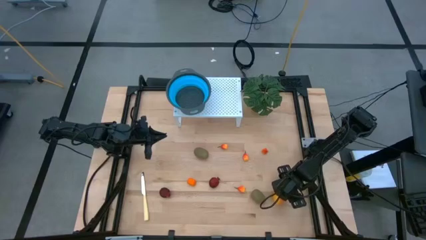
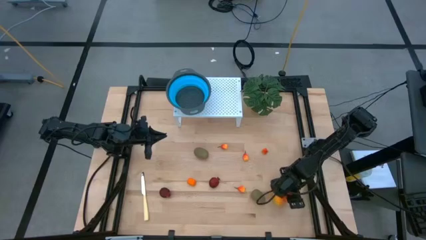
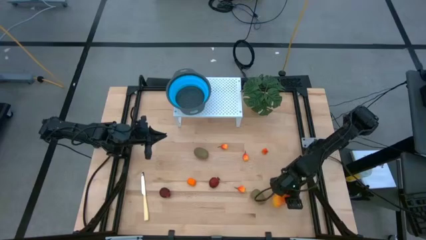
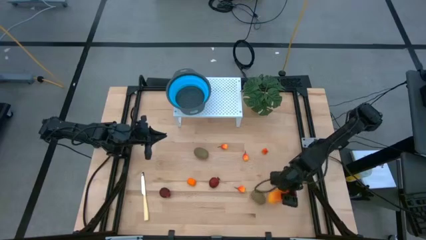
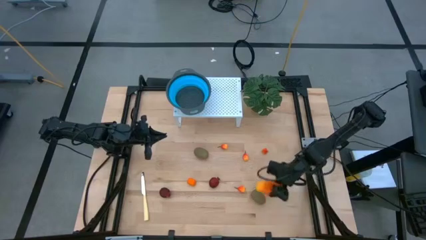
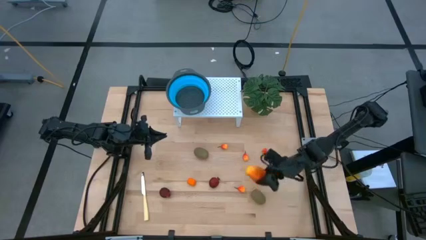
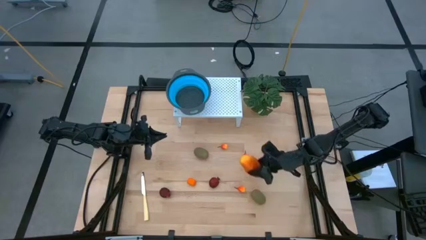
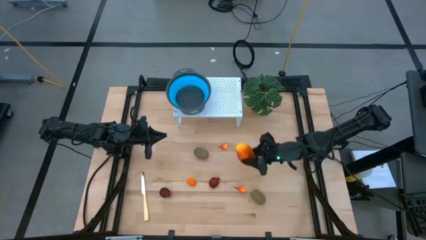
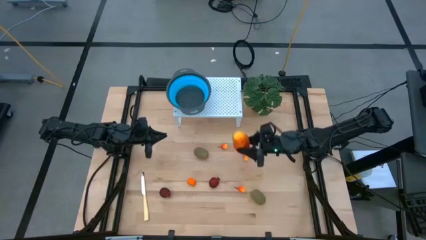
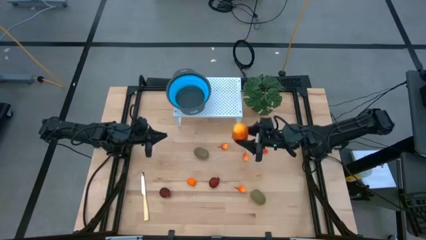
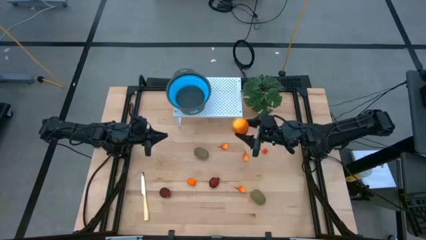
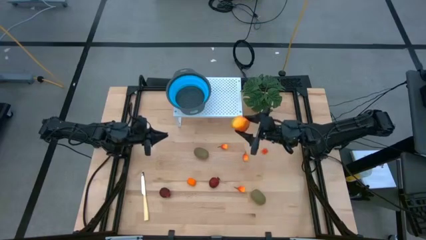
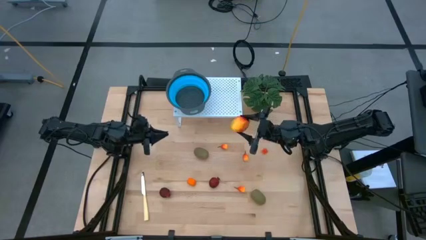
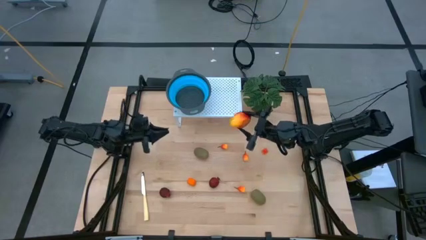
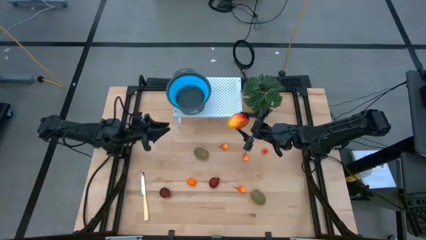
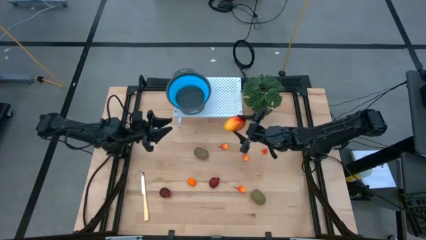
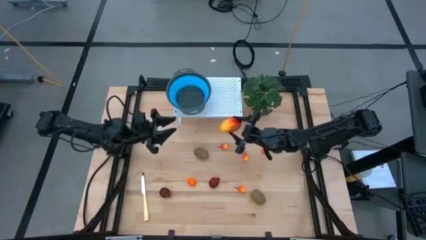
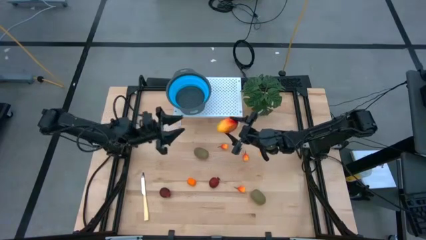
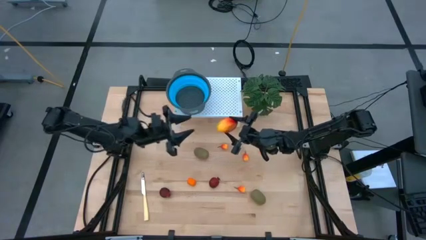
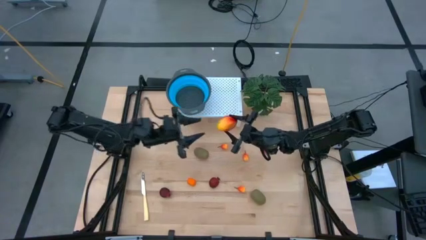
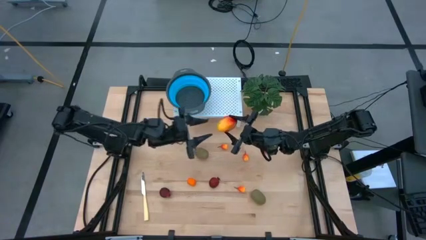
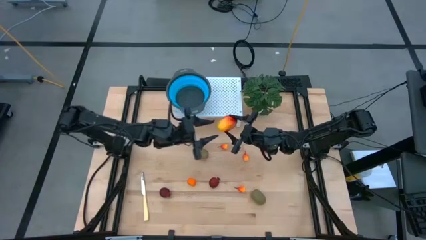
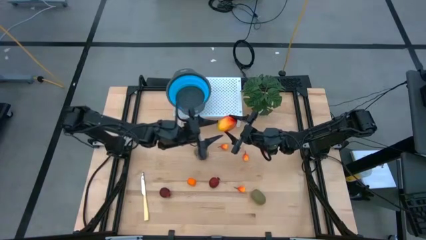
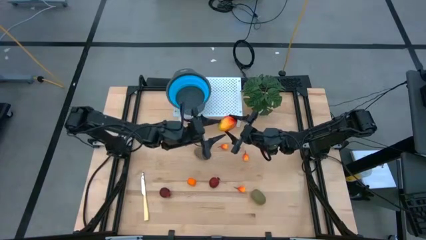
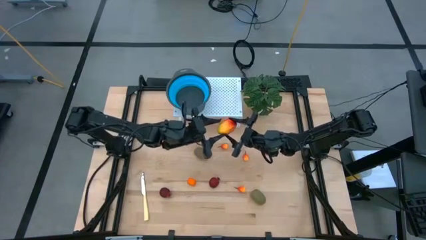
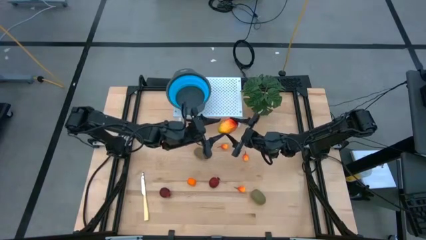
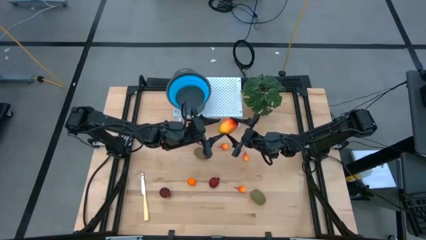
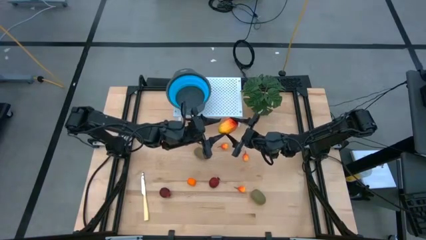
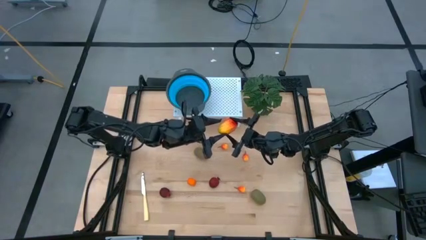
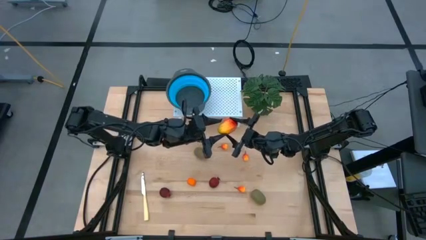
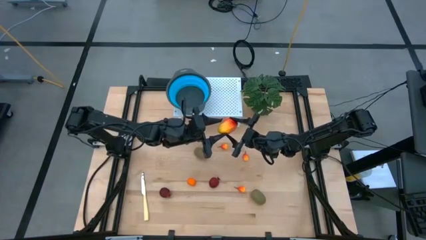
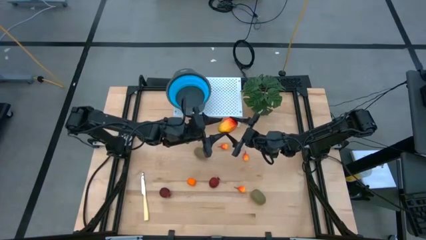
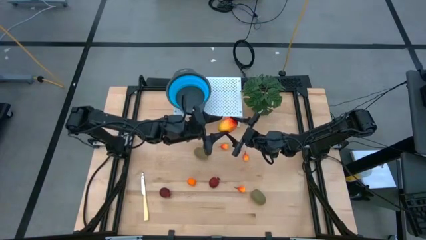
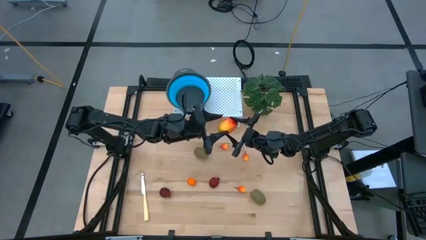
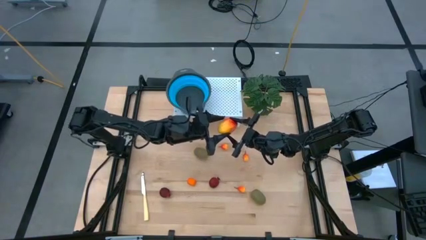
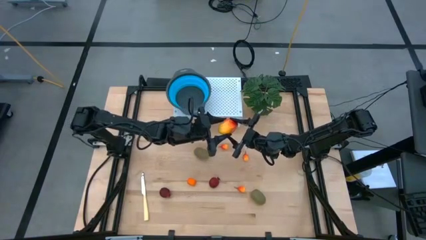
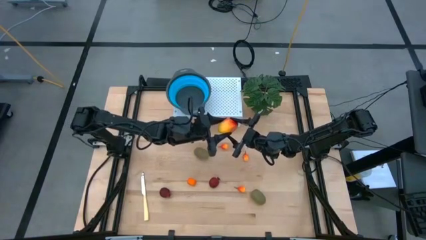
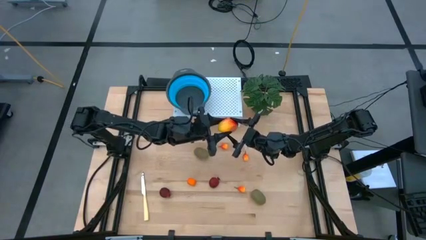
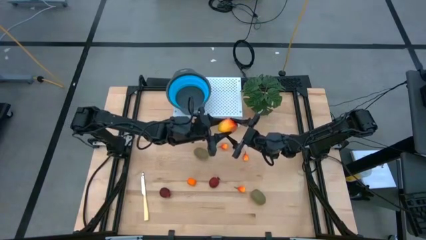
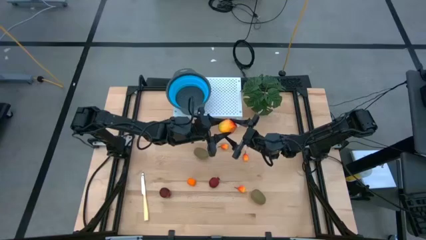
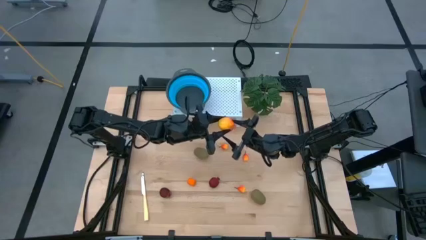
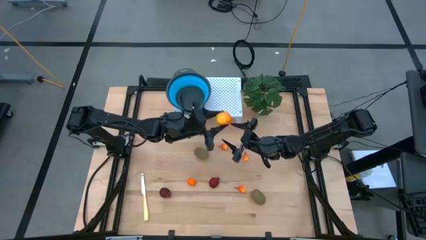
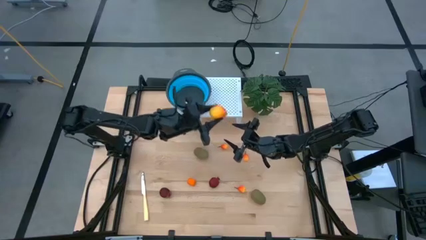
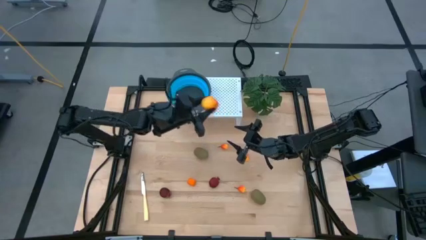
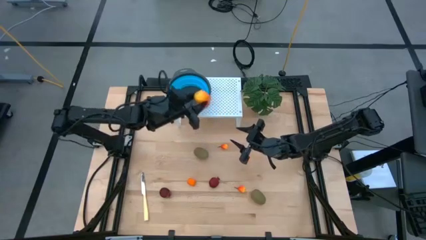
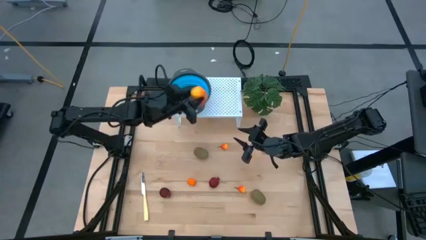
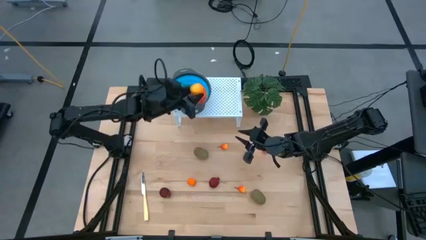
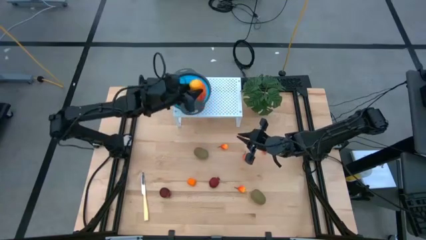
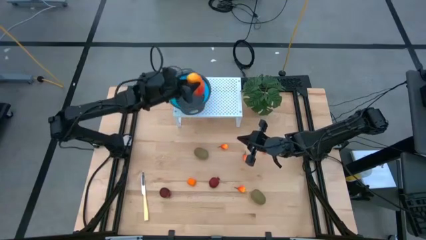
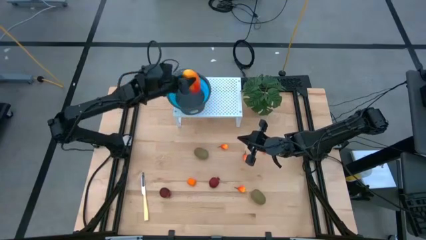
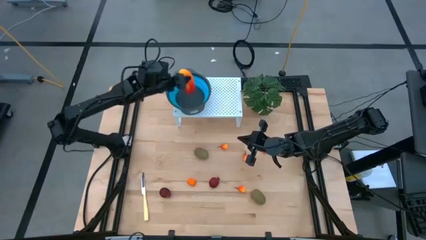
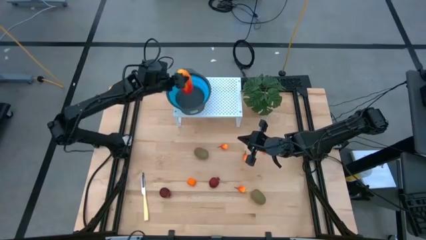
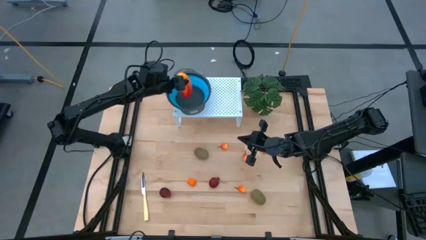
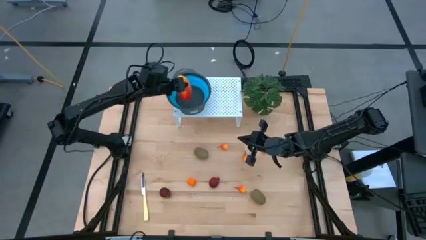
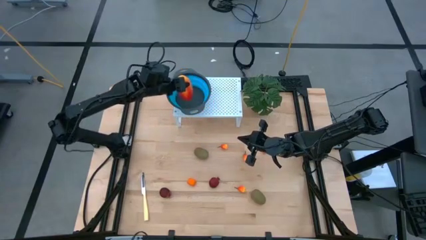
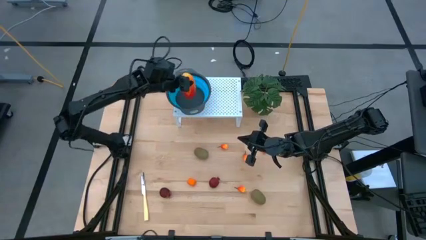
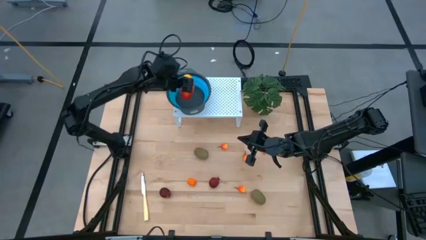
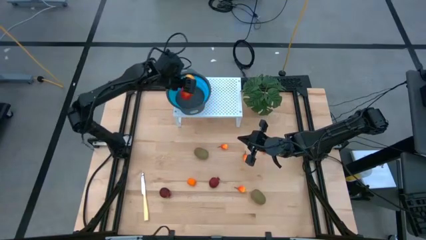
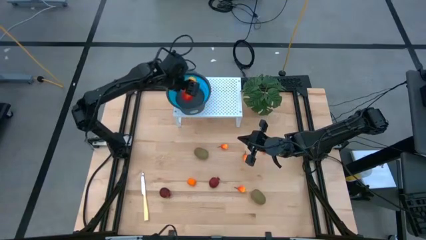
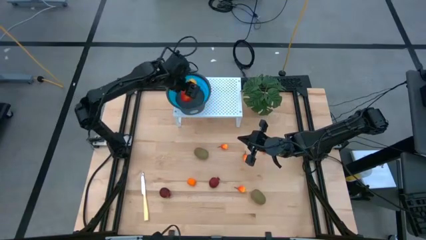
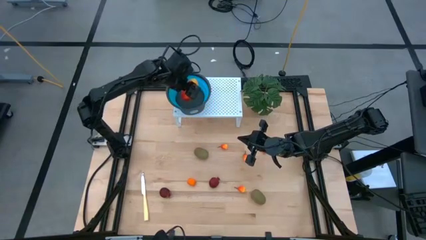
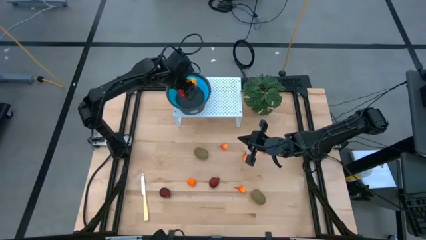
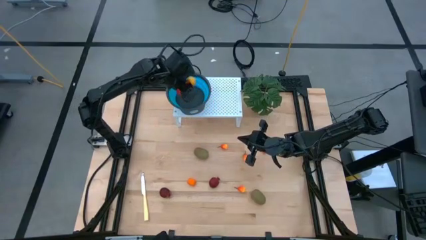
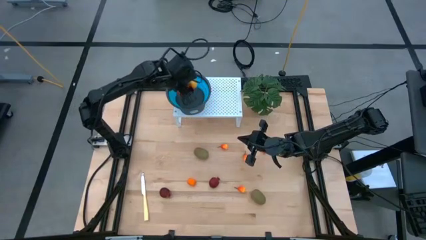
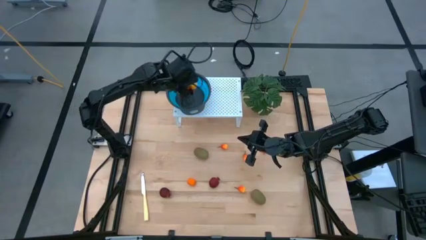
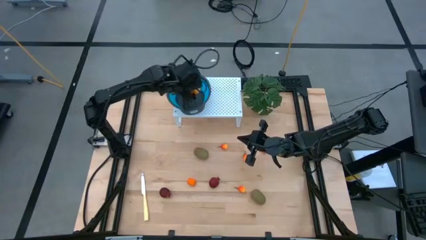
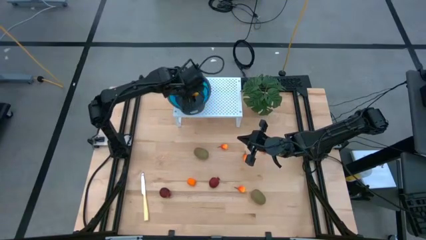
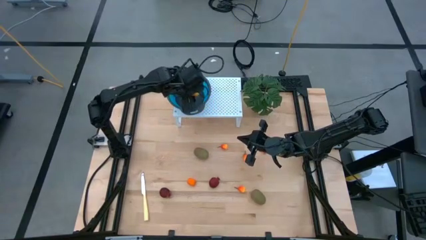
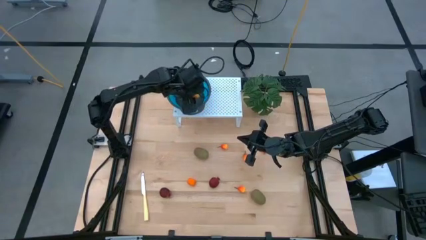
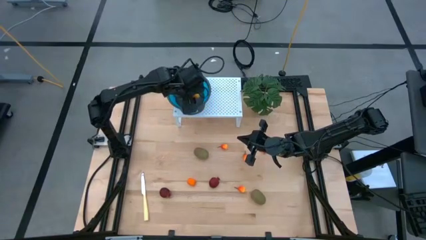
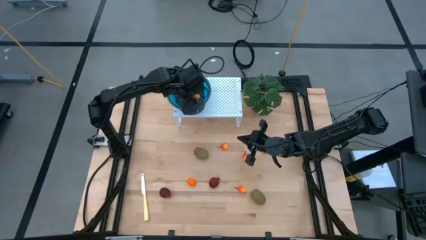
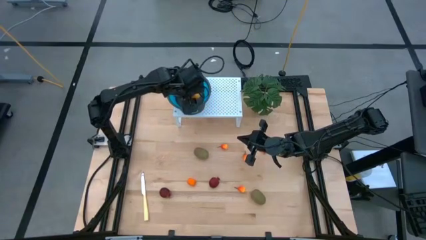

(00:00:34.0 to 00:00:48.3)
Task: Pick & Place Fruit
Put the mango in the blue strainer bowl on the shelf

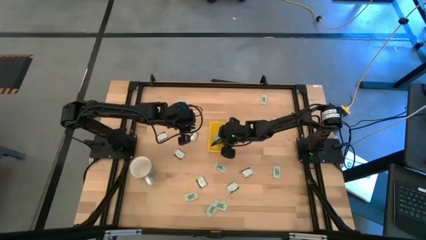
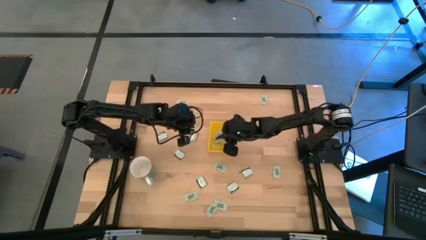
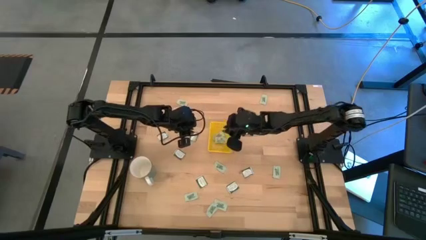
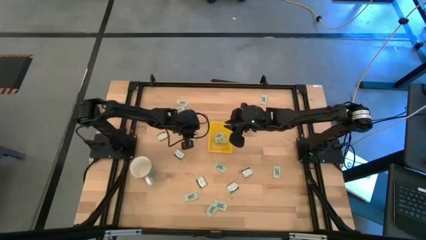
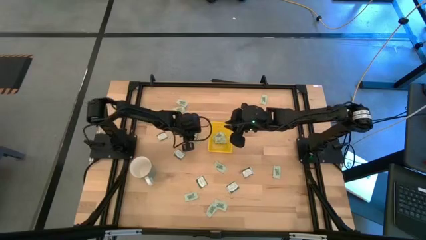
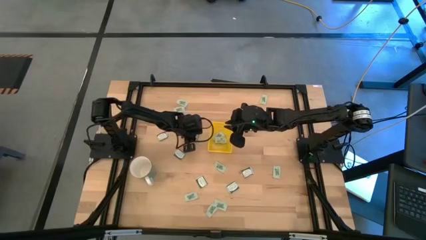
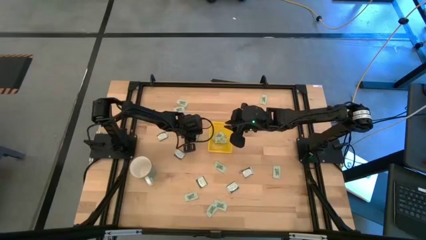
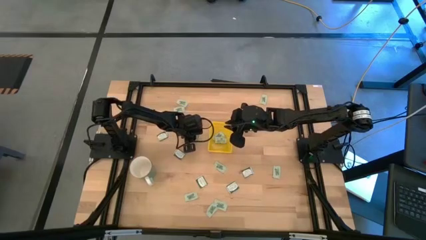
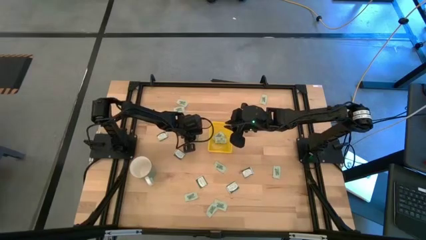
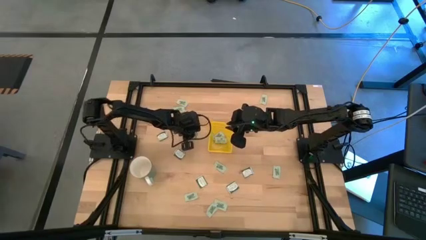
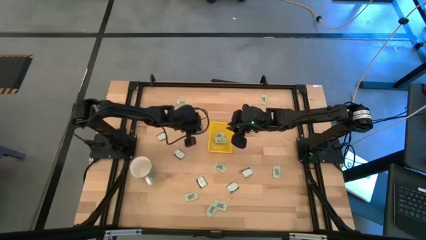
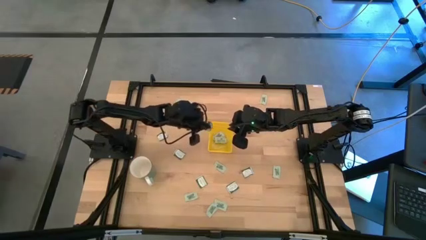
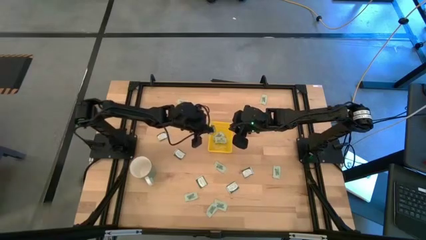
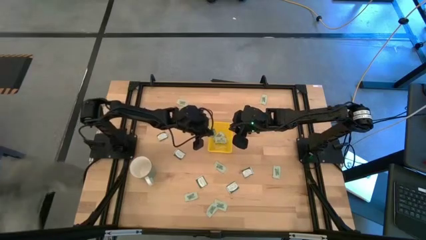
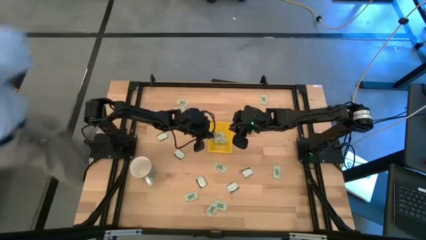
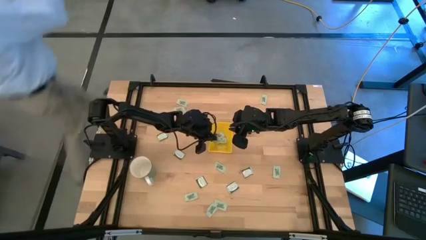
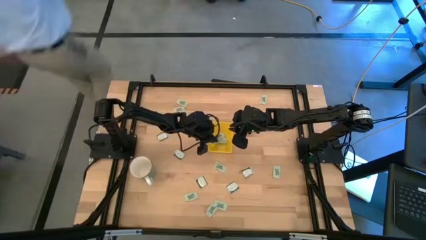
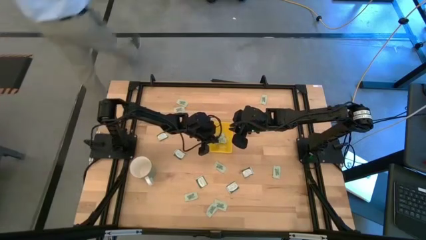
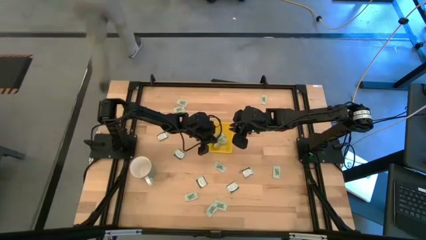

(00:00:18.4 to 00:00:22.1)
Task: Pick and place Stevia / Truvia into bins
Put the green stevia packet into the yellow bin
